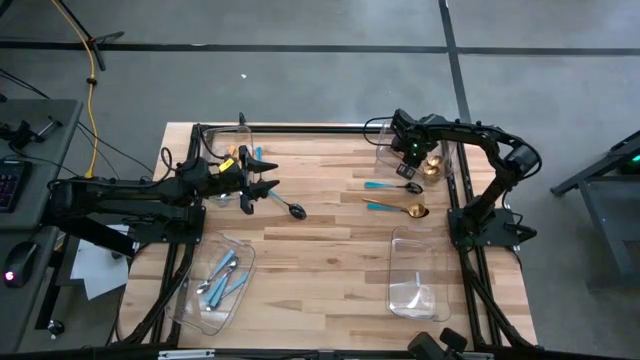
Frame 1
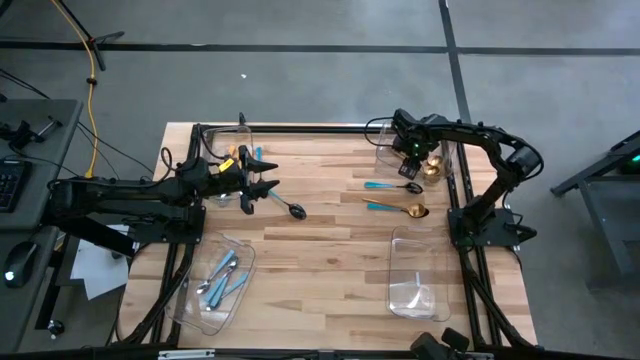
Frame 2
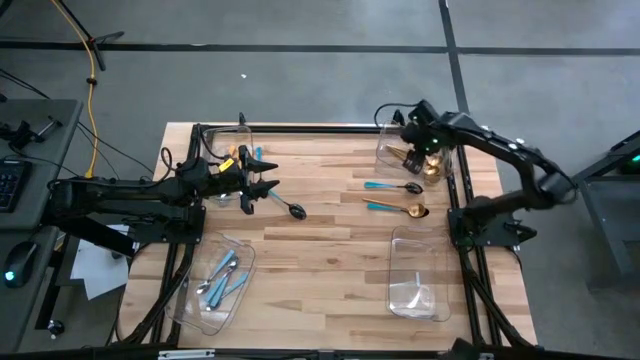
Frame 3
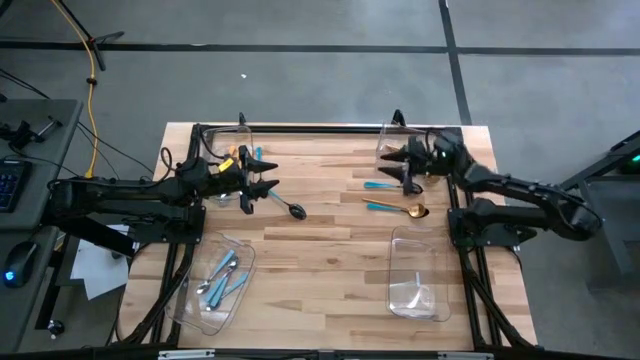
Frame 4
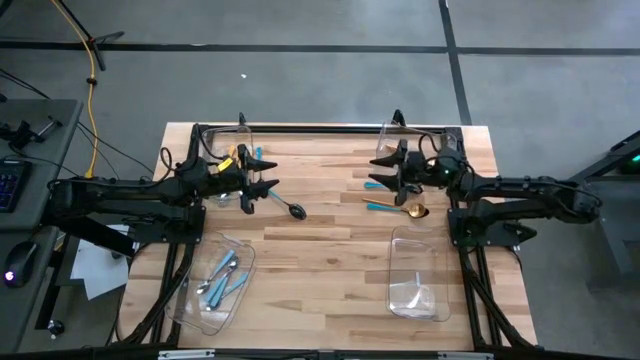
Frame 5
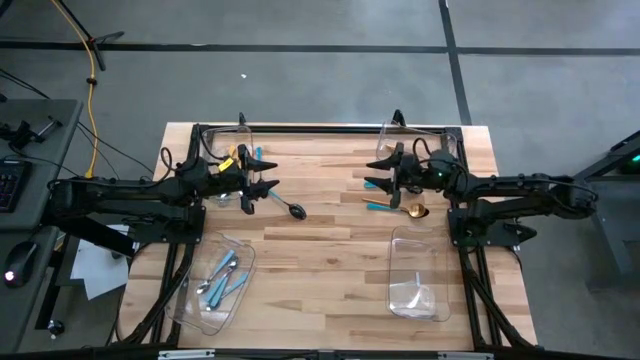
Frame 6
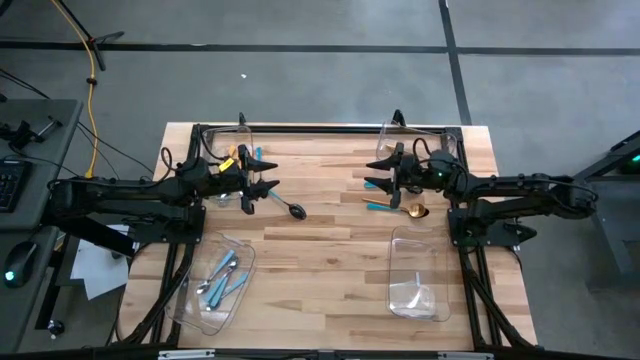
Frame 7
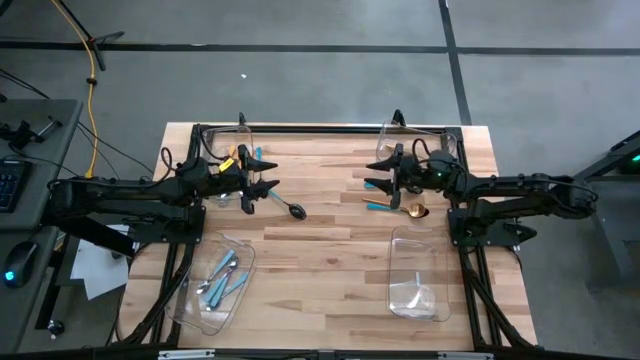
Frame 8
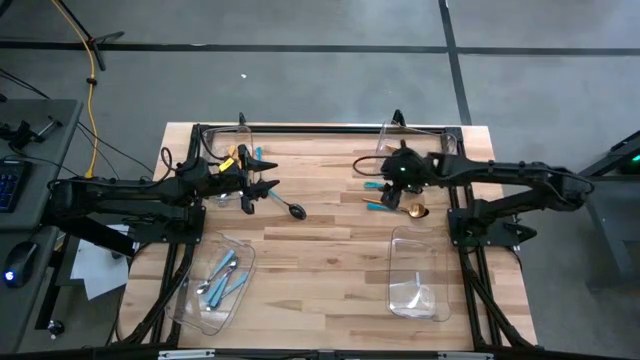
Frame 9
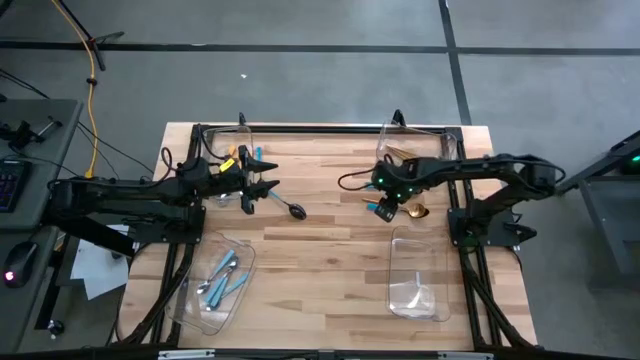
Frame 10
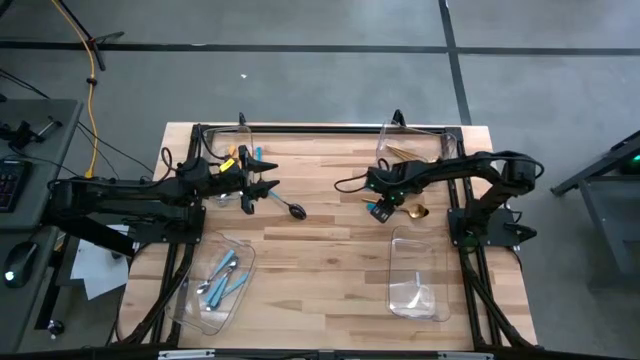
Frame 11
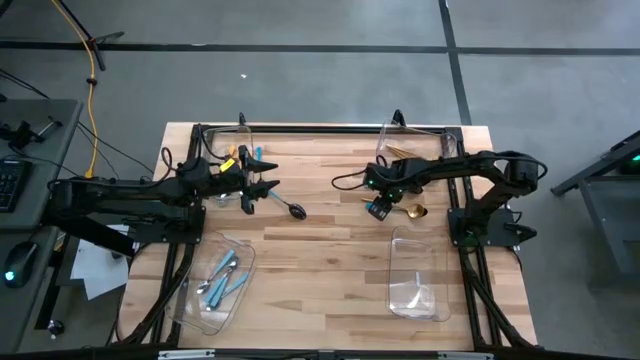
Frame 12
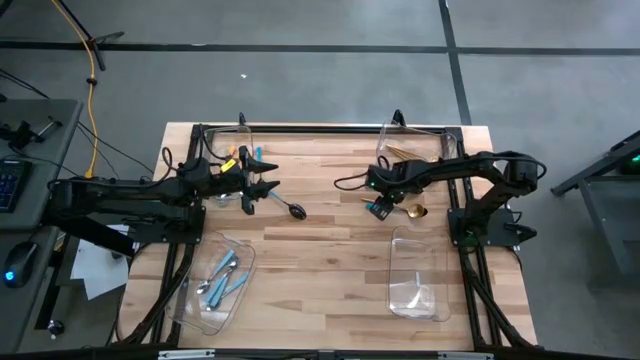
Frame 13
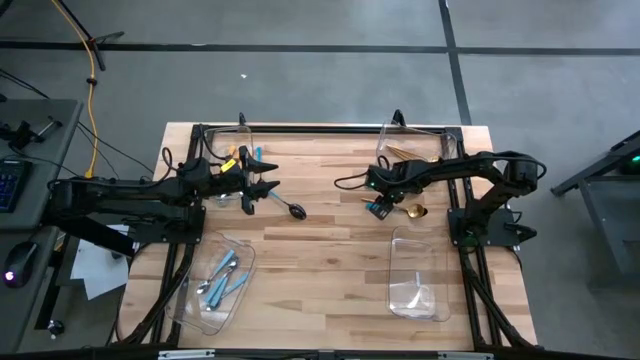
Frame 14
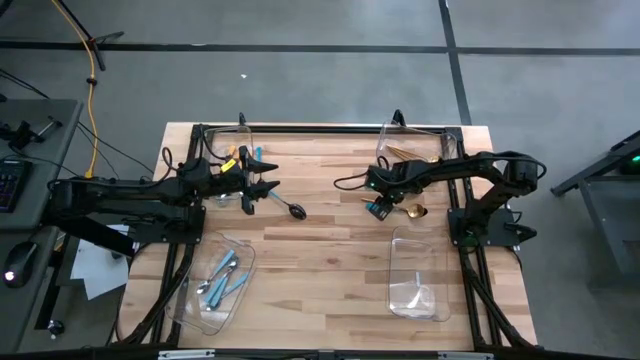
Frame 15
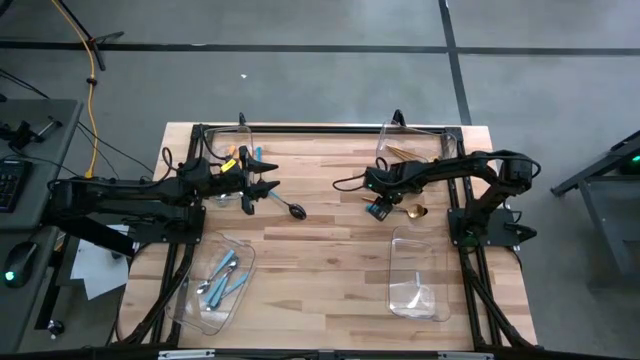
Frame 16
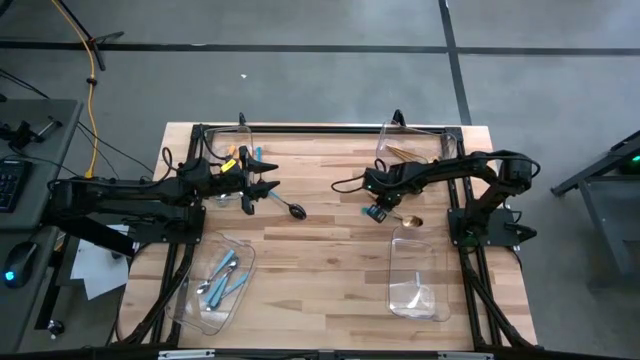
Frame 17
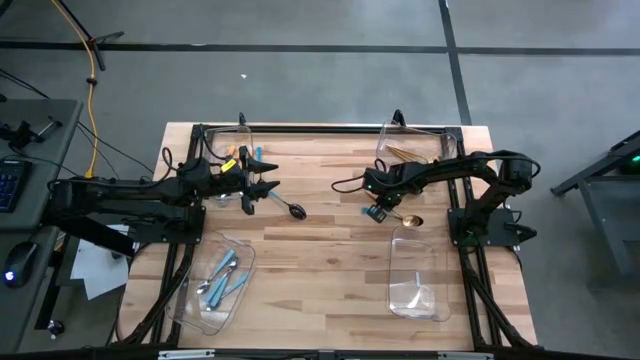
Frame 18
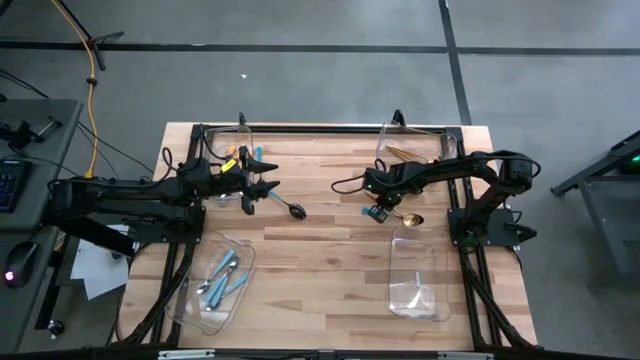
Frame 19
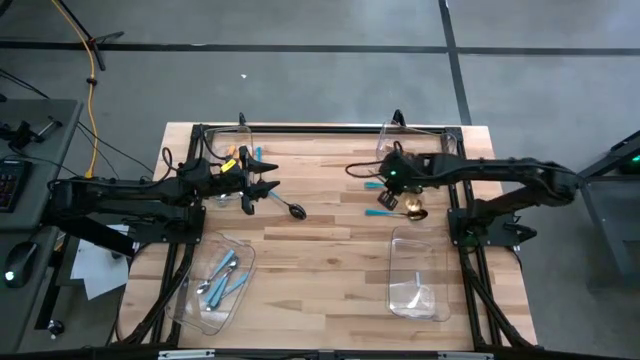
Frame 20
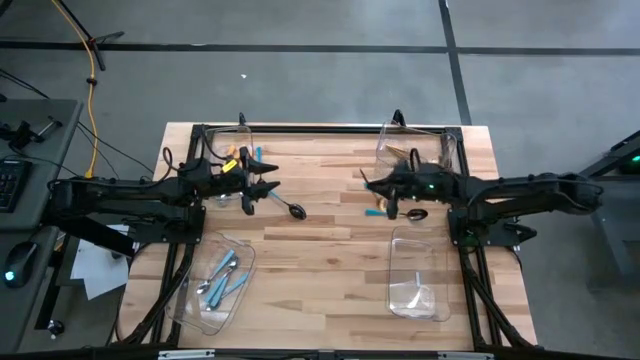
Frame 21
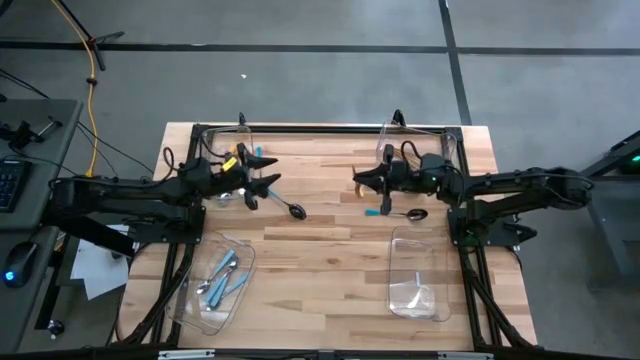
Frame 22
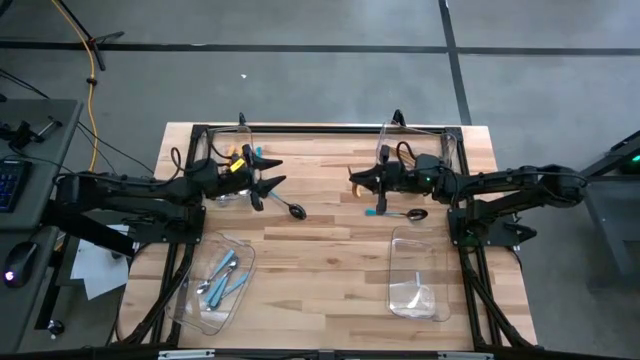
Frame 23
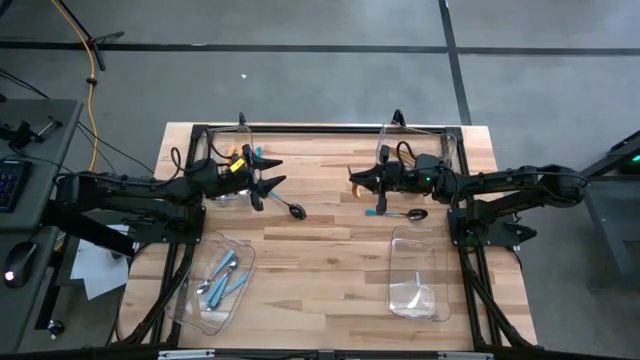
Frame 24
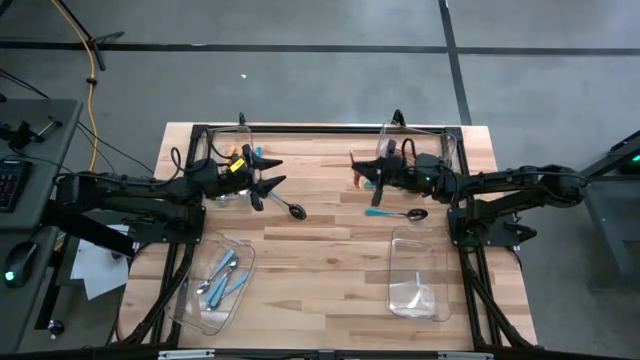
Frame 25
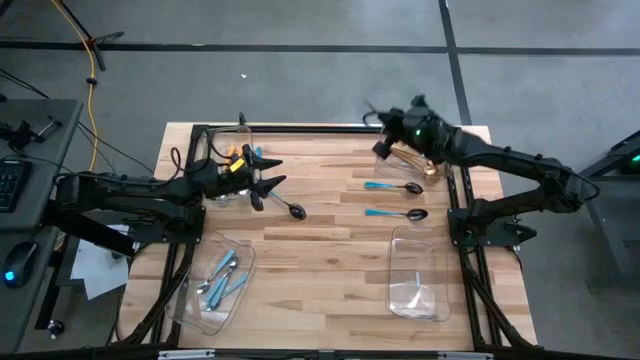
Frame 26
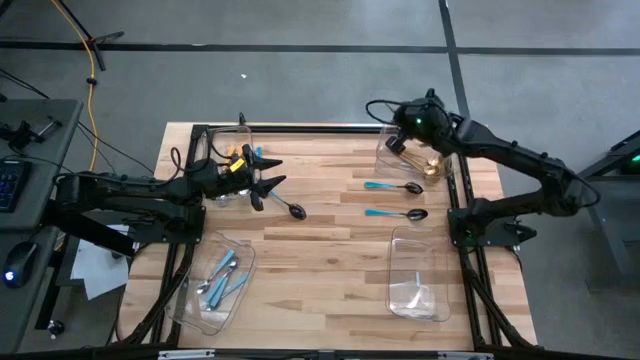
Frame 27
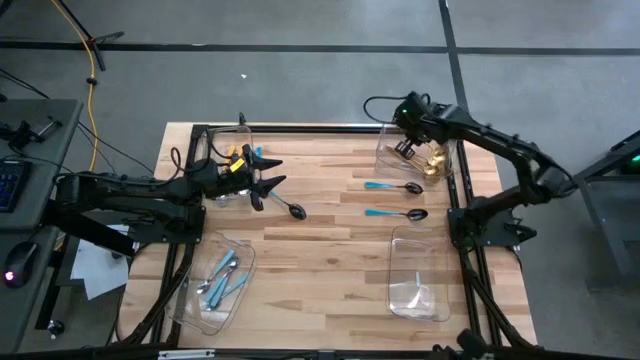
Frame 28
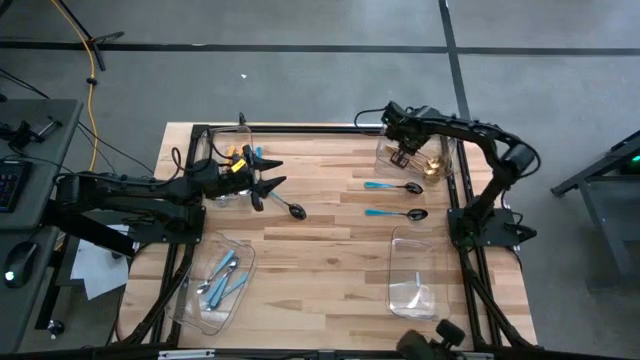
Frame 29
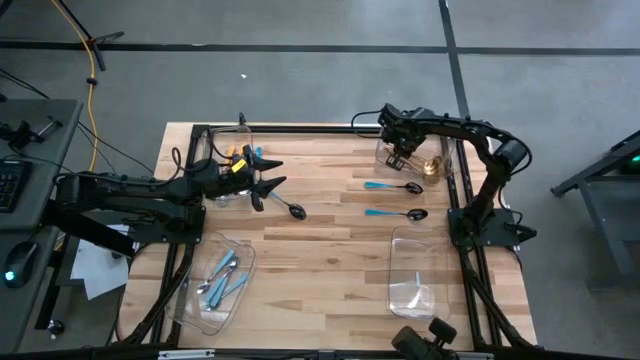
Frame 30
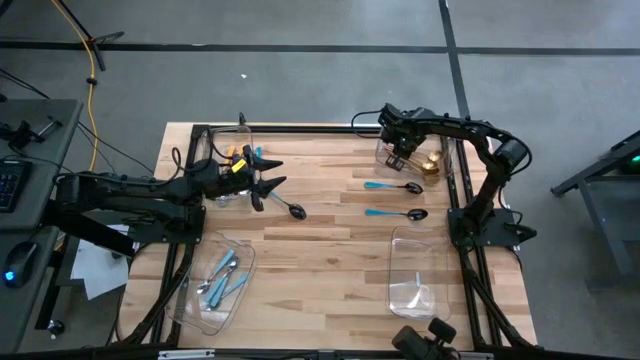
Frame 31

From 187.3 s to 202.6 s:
Task: Sort silverware by color (type)
Put the gold spoon into the top right transparent bin

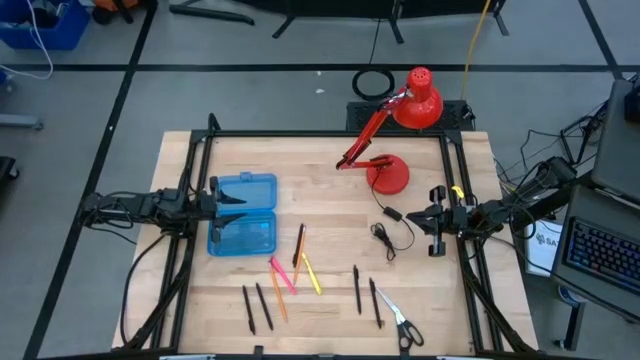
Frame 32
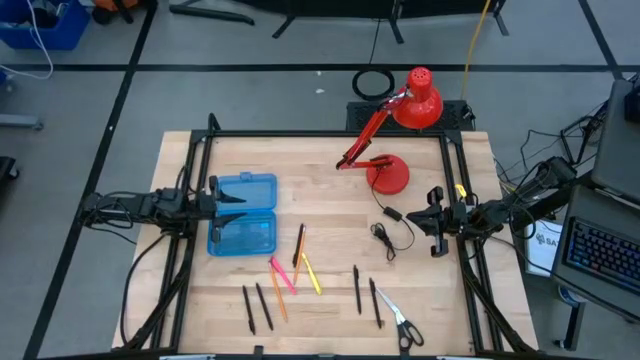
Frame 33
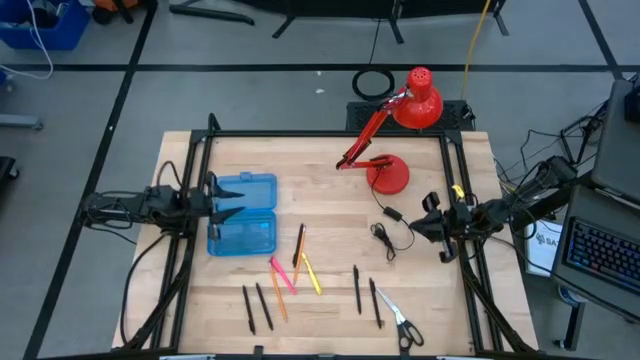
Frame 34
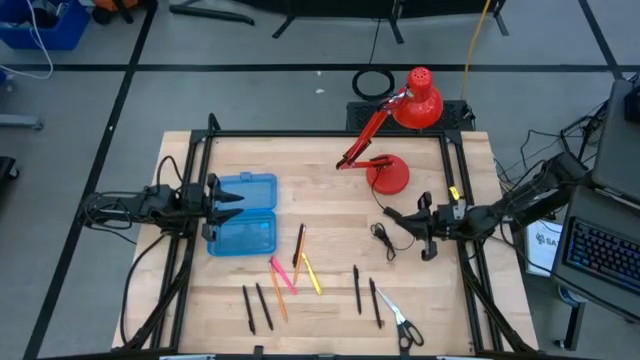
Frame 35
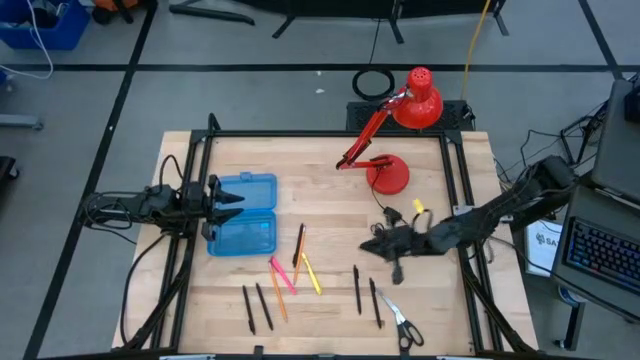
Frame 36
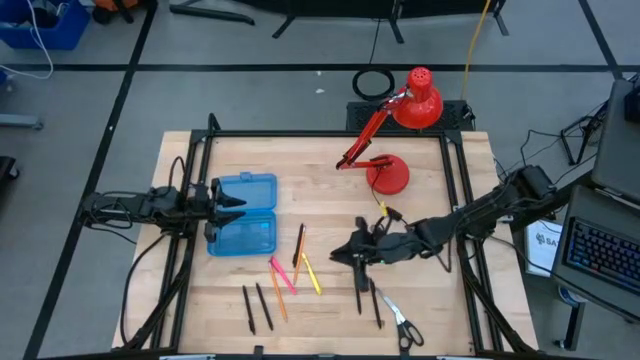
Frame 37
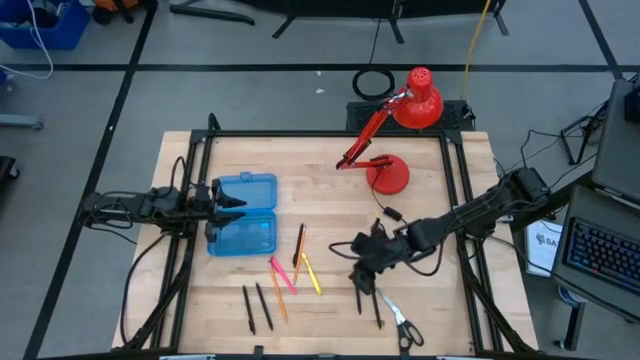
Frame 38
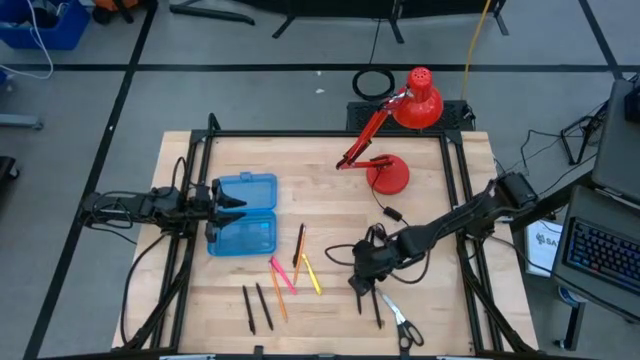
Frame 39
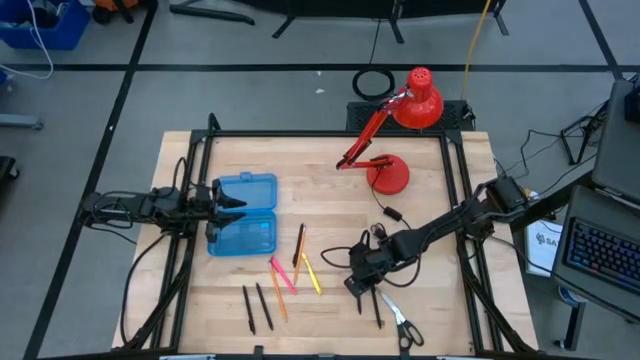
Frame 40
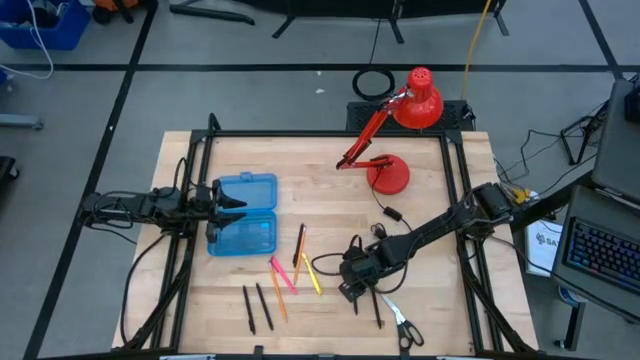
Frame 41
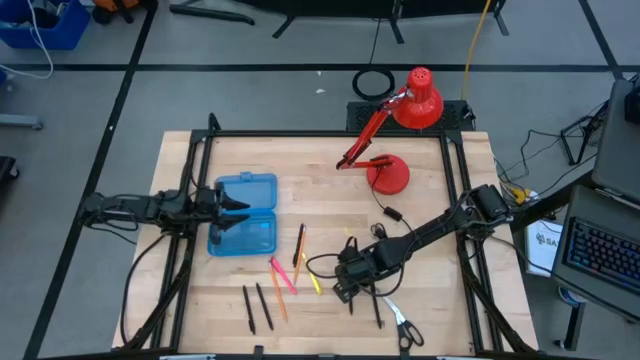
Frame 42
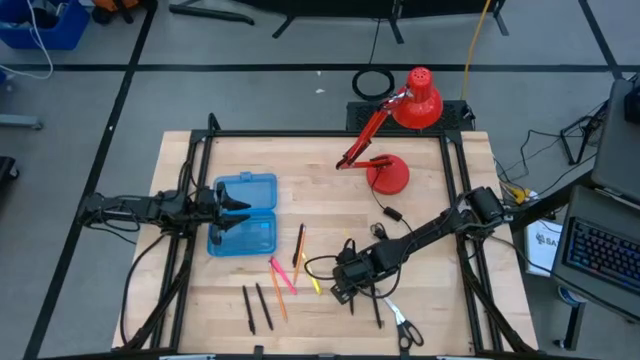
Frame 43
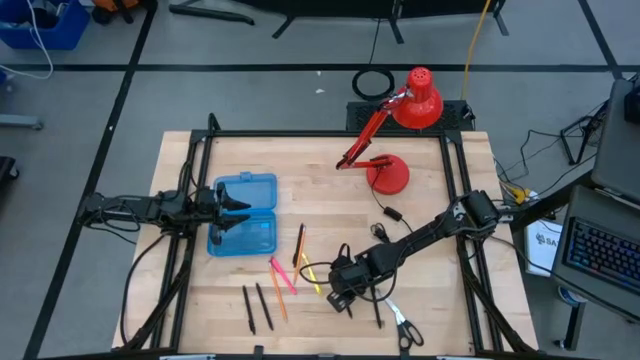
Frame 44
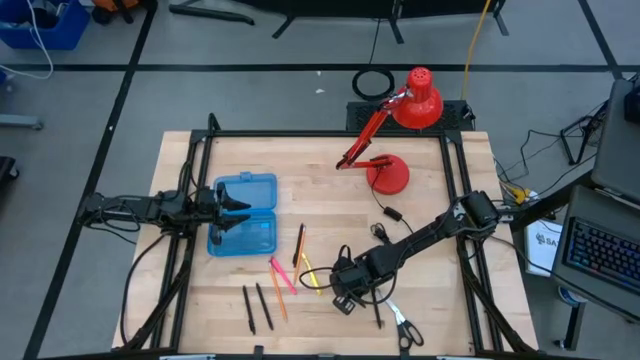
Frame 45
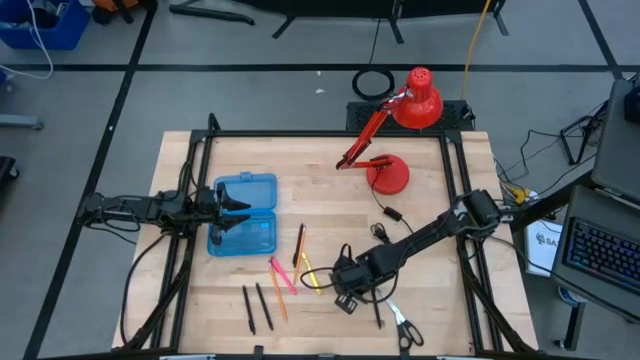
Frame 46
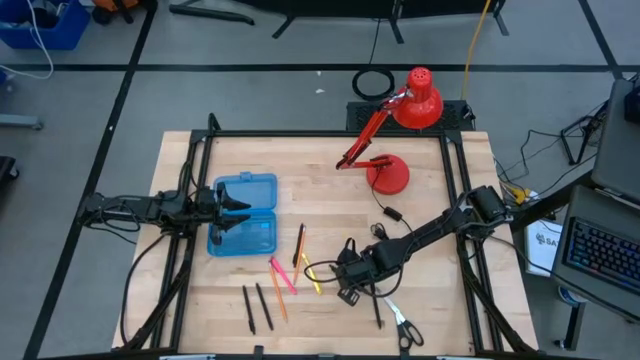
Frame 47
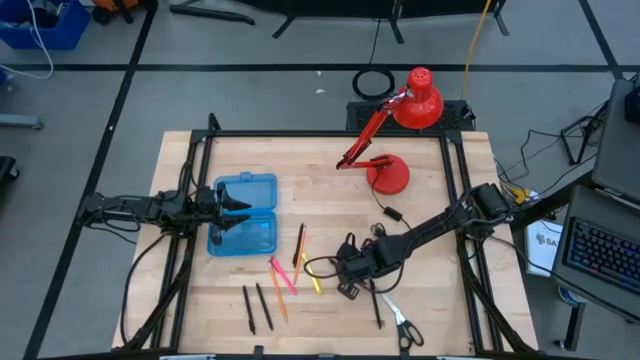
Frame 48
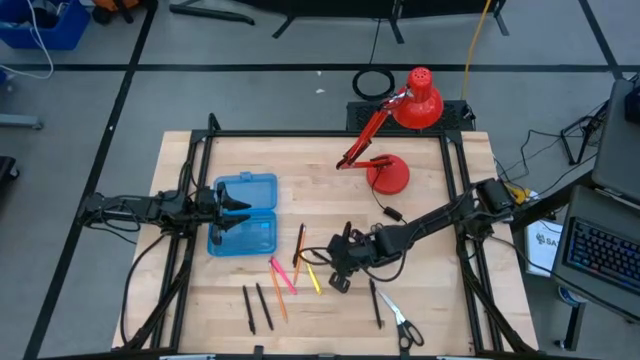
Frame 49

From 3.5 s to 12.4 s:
Task: Pick & place school supplies into a supply box
Put the black pen into the blue supply box
